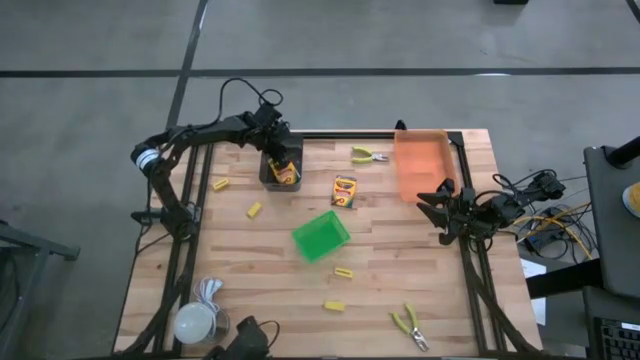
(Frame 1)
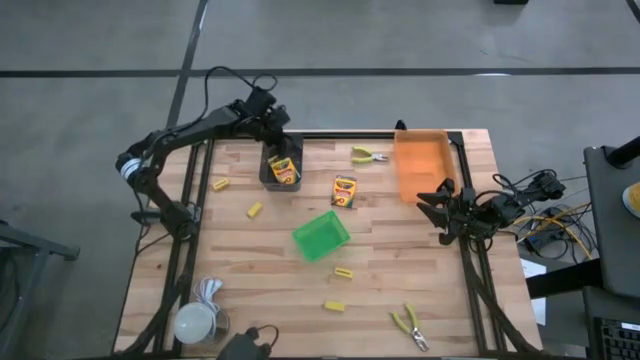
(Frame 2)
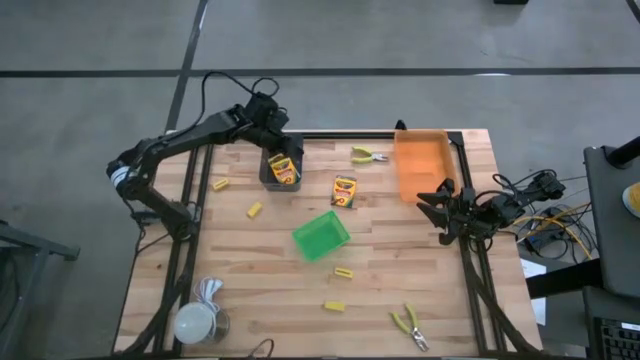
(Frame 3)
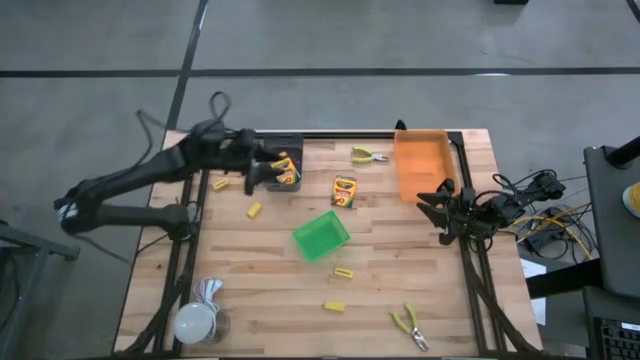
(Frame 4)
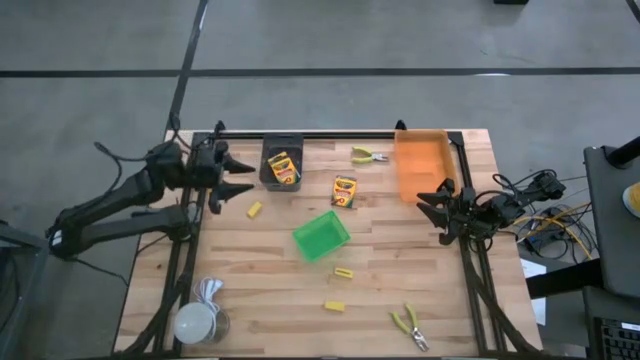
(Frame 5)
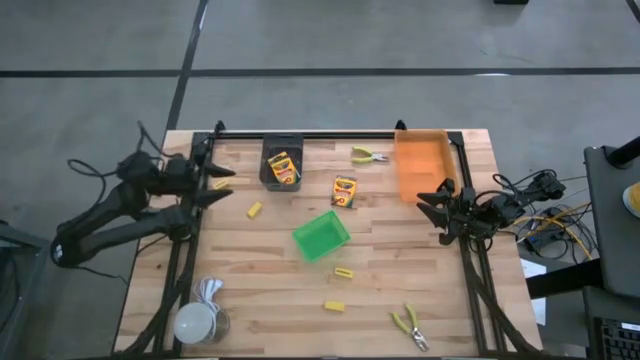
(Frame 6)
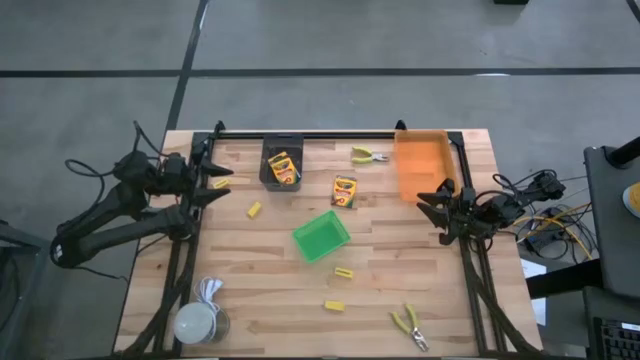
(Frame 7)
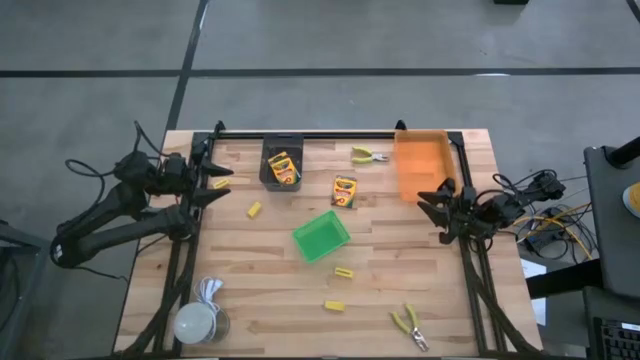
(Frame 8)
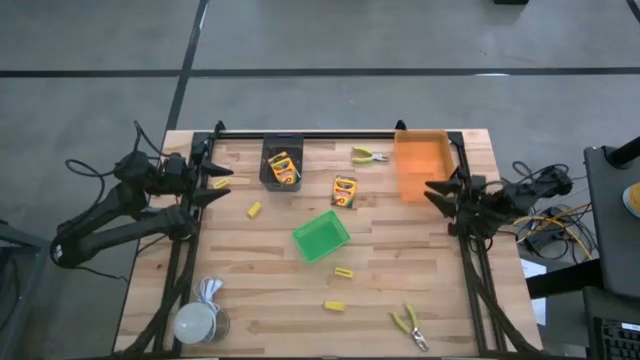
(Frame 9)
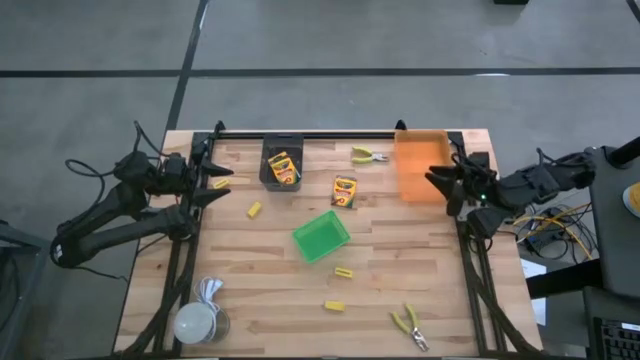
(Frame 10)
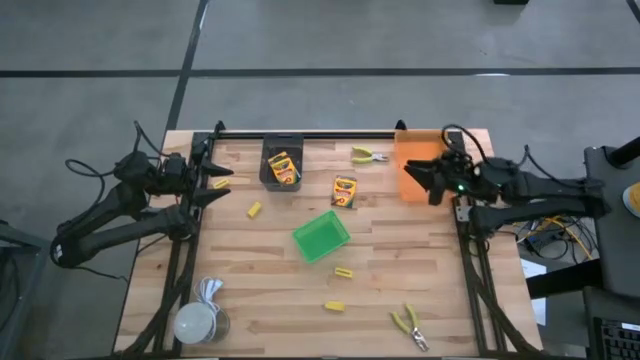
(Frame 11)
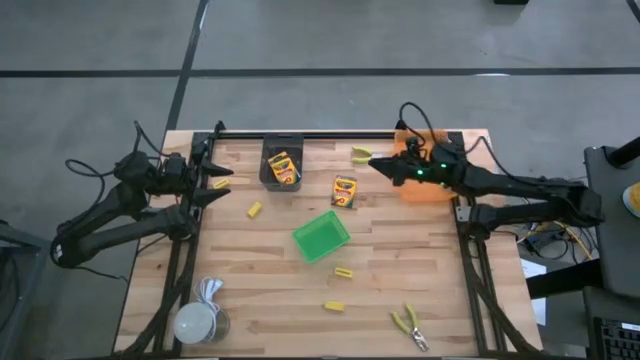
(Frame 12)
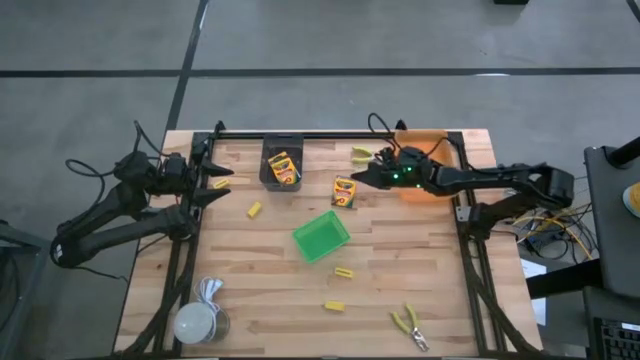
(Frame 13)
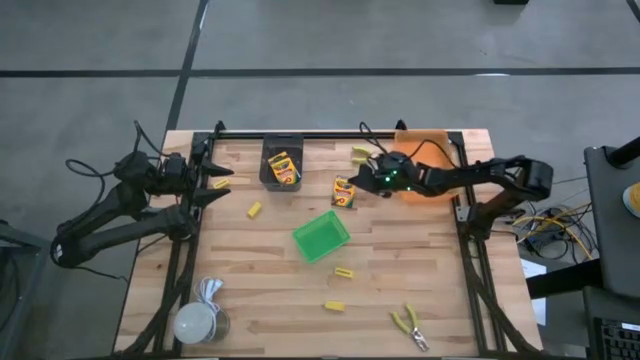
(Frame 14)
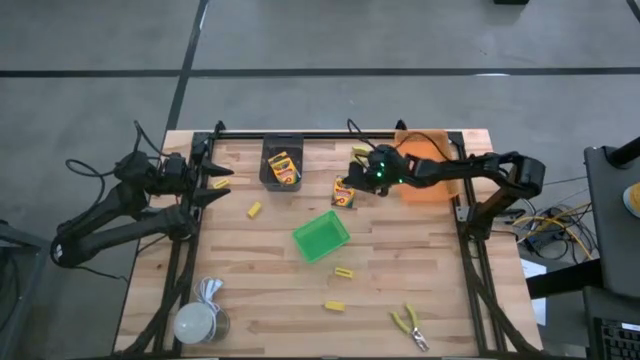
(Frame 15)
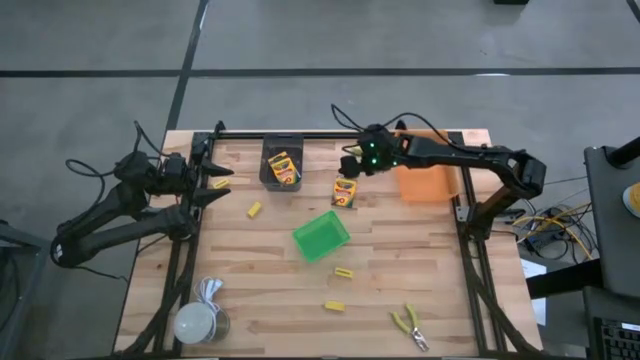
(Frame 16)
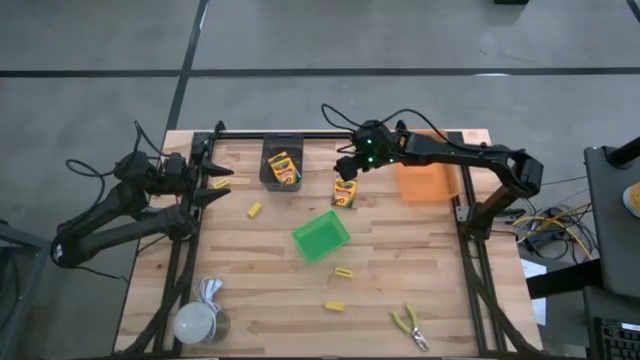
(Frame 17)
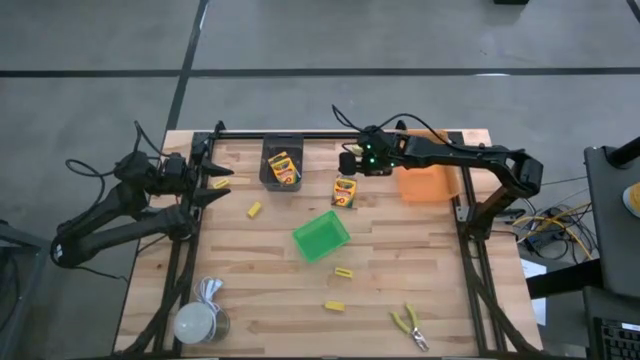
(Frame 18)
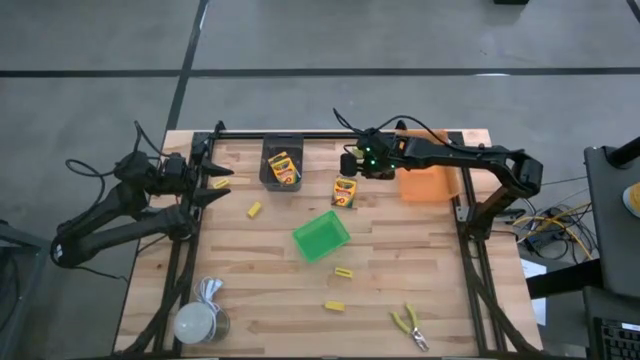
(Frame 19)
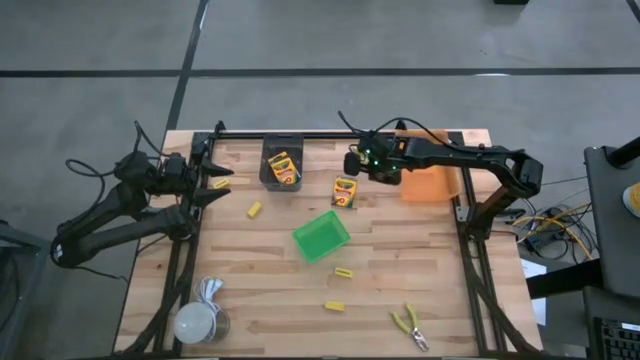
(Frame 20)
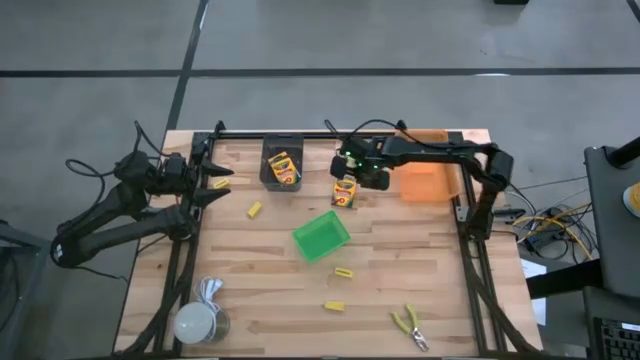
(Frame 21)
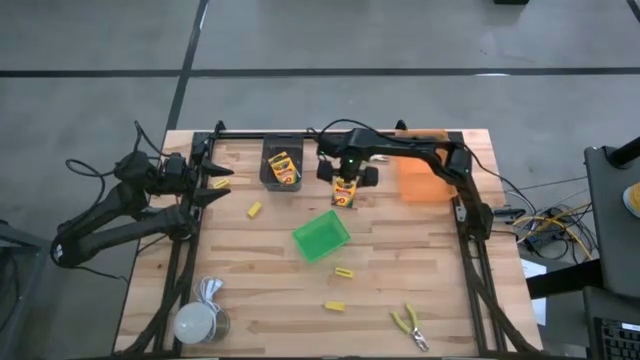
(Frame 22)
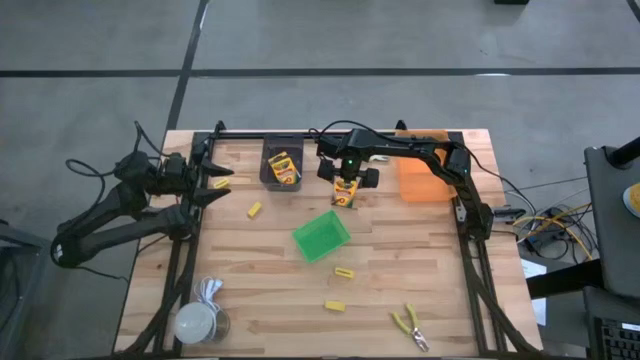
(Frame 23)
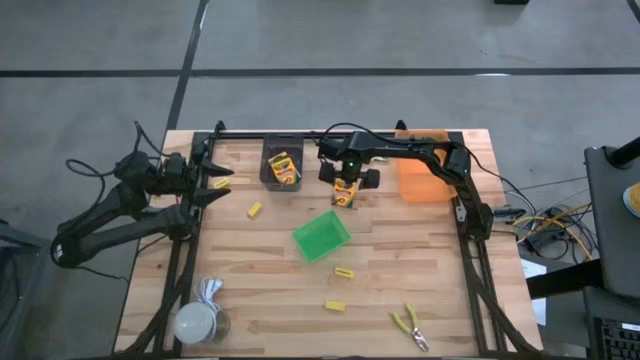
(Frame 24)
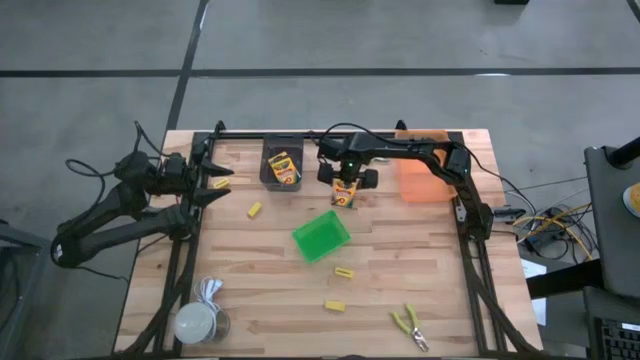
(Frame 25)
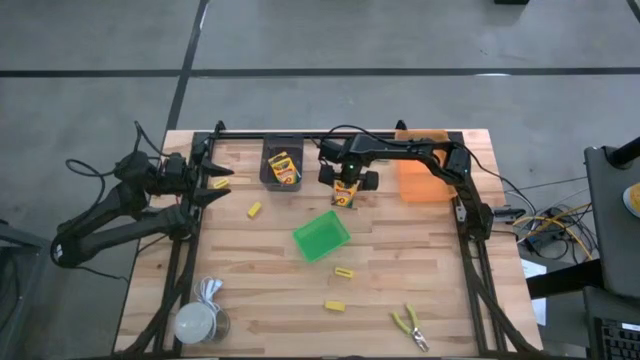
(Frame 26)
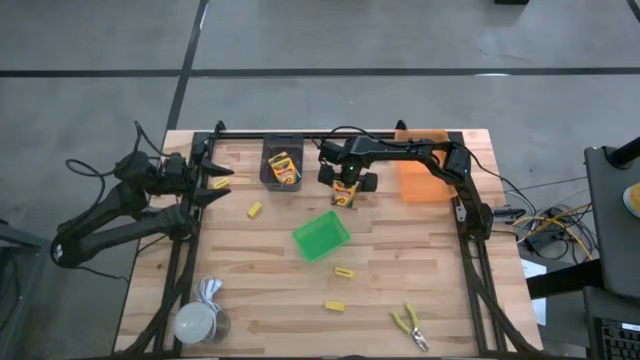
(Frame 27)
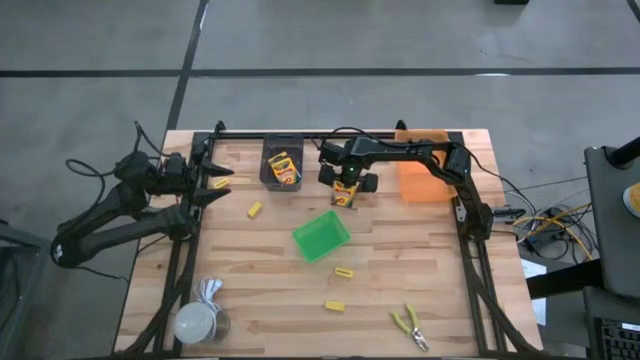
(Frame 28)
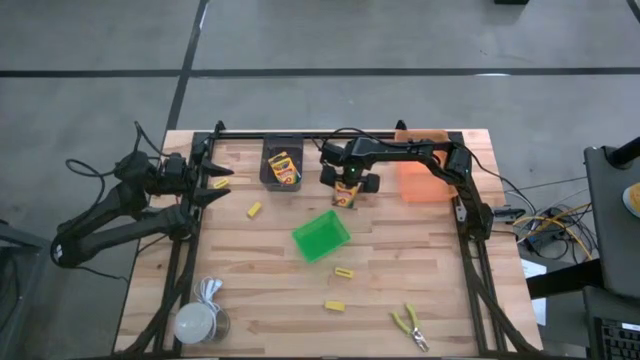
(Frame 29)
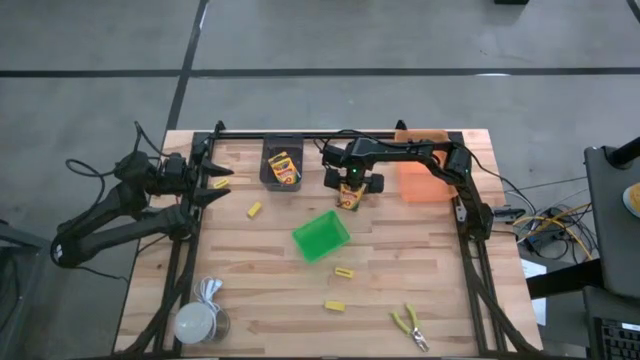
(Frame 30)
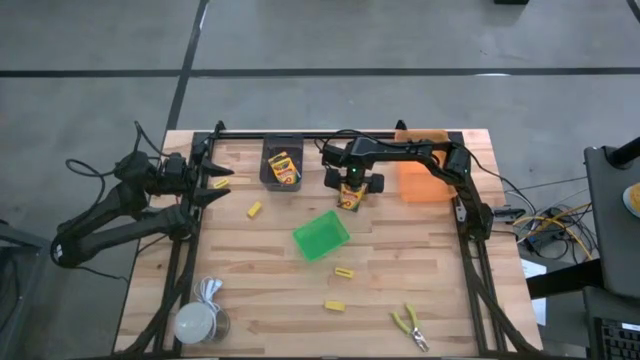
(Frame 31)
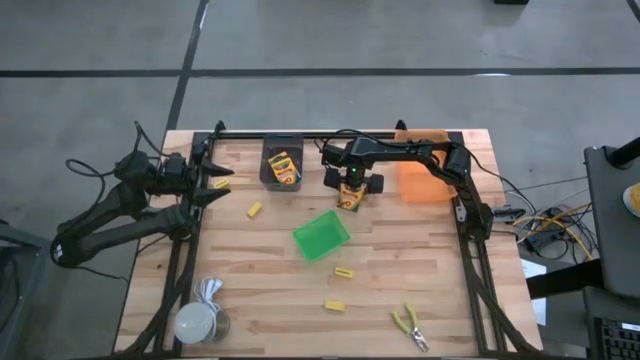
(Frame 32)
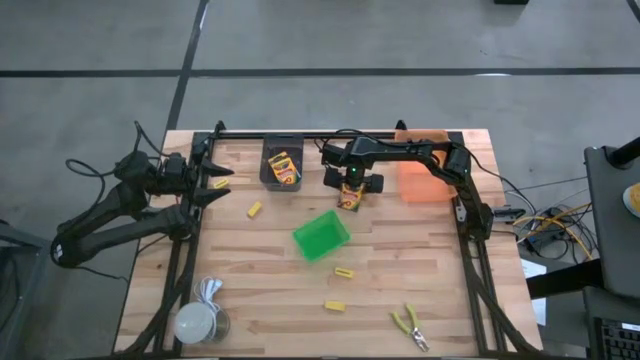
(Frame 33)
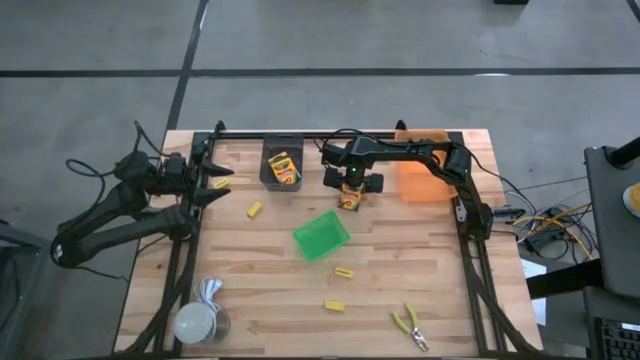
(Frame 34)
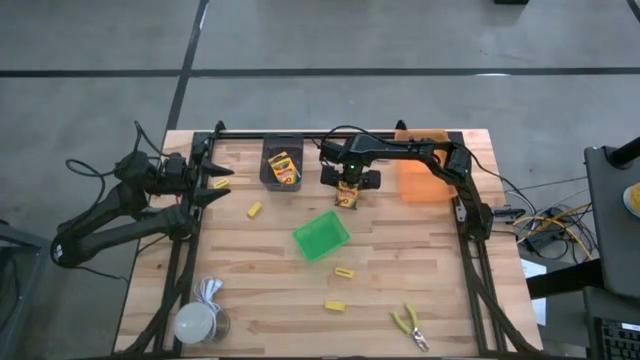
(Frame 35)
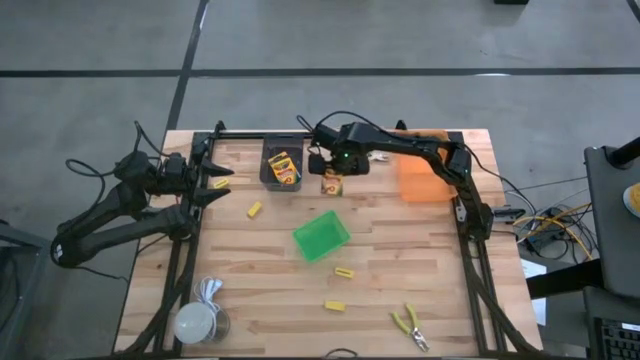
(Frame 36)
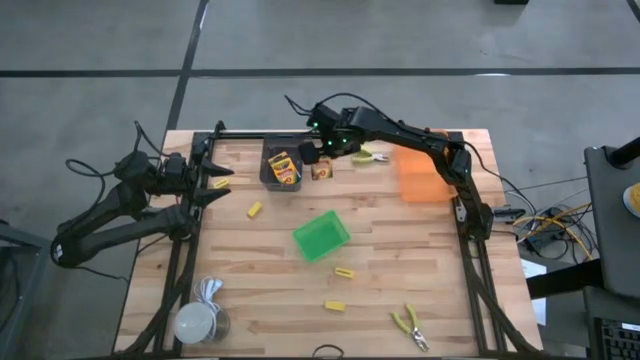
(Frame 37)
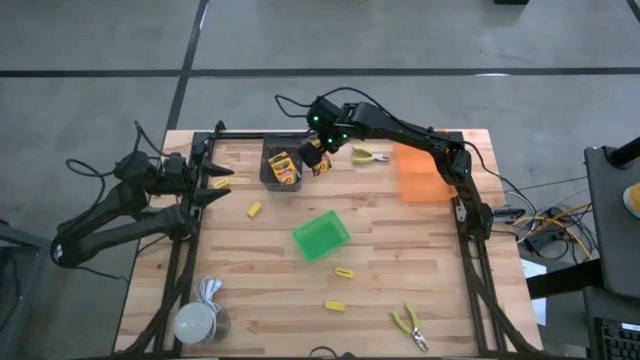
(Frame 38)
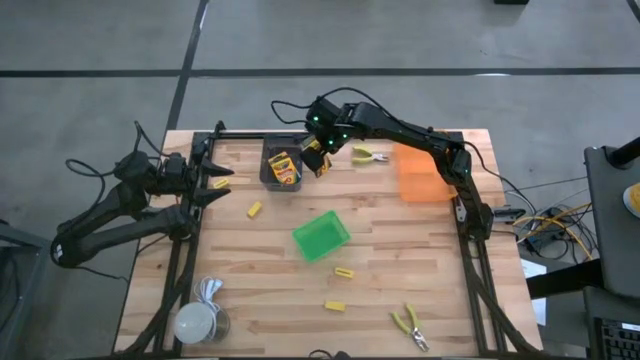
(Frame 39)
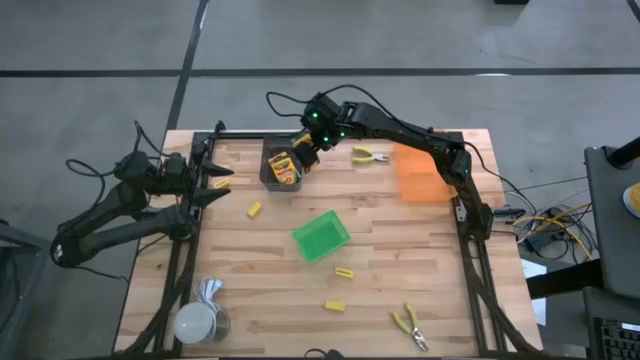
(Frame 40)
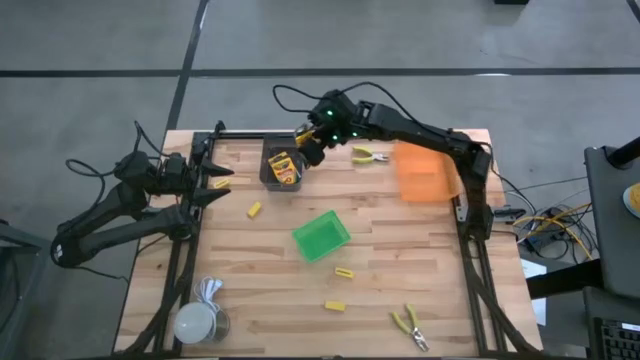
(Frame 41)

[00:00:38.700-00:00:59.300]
Task: Pick & Place School Supplies
Stack the yellow crayon box on the yellow crayon box in the black bin
